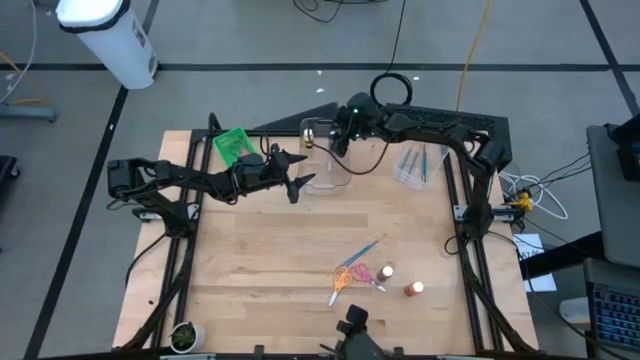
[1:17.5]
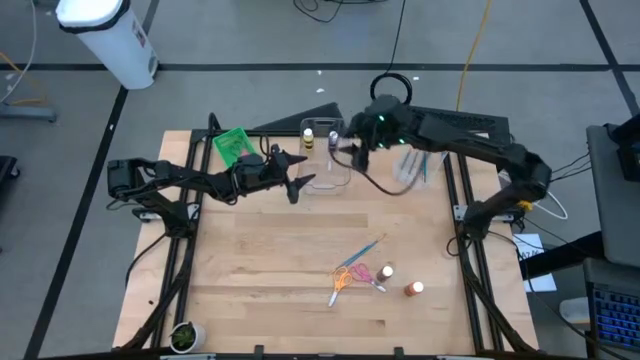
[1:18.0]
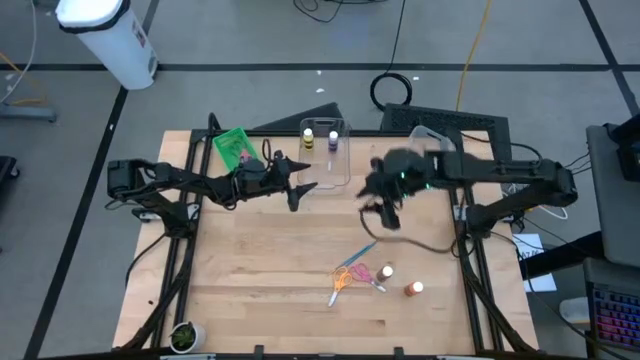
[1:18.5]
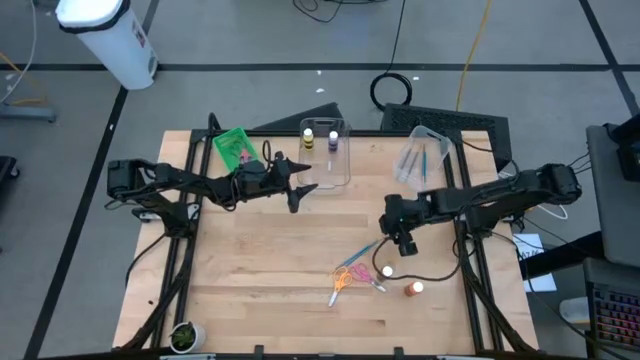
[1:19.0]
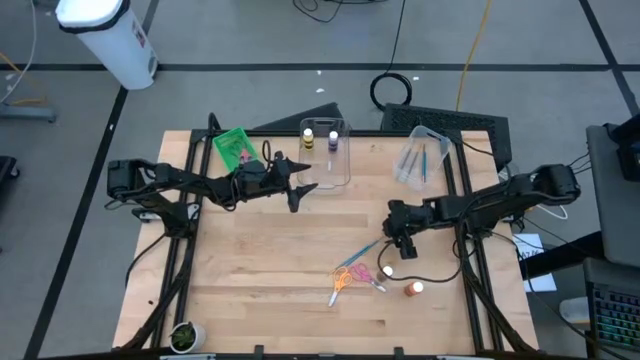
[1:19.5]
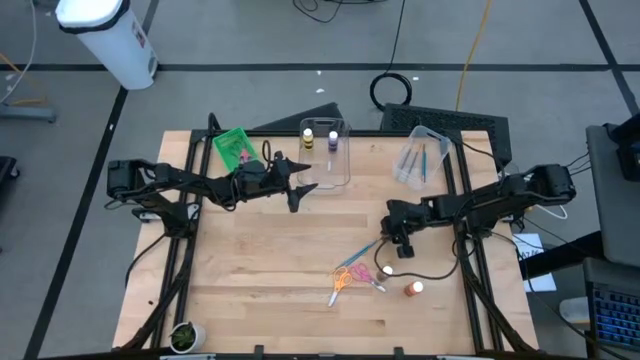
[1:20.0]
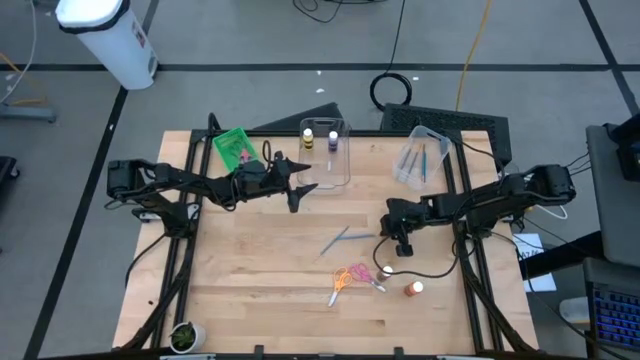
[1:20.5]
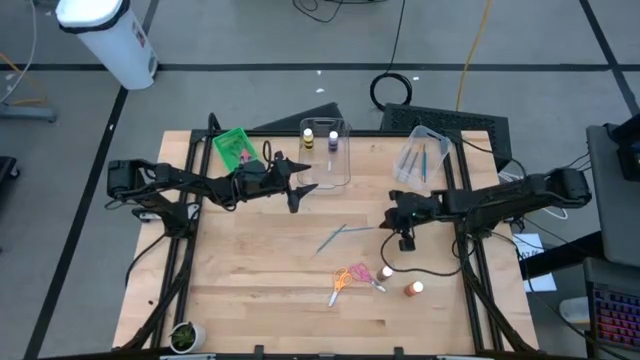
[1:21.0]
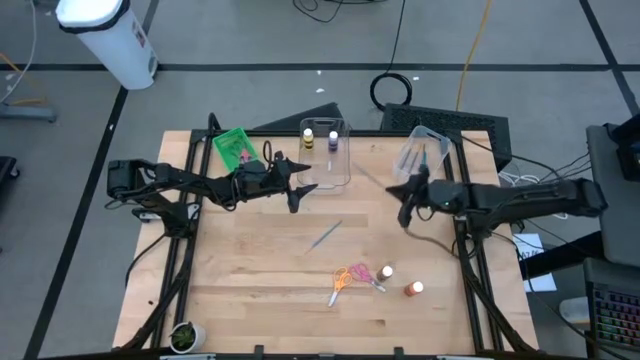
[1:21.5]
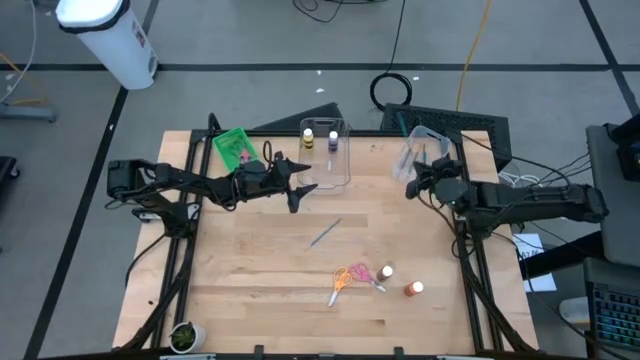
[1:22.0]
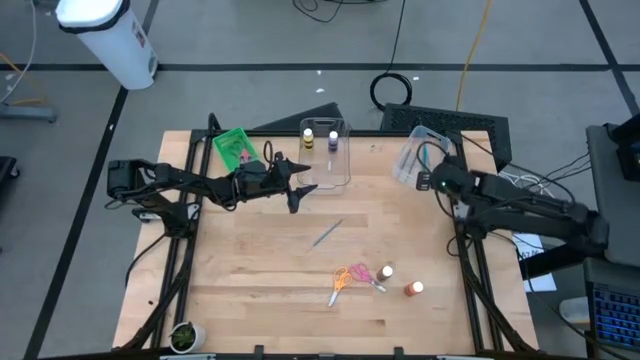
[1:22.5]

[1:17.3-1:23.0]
Task: Pick & Place Paint Supplies
Put the blue paint brush into the white bin

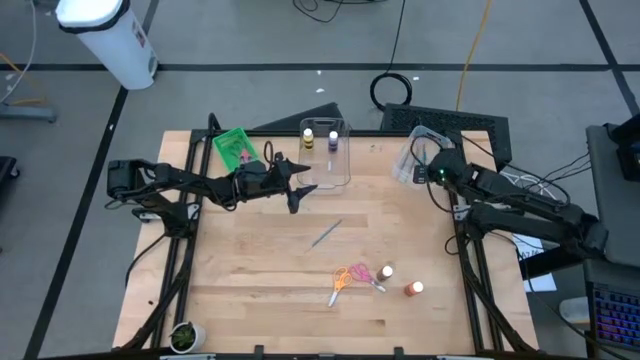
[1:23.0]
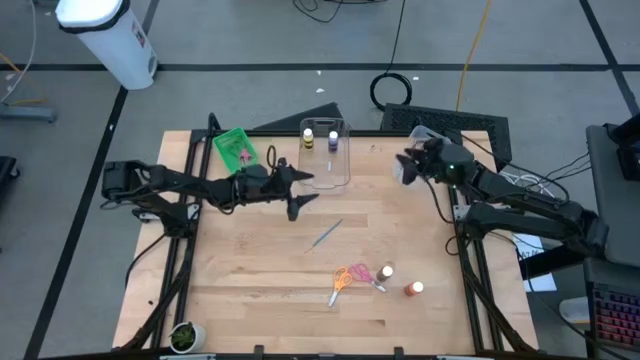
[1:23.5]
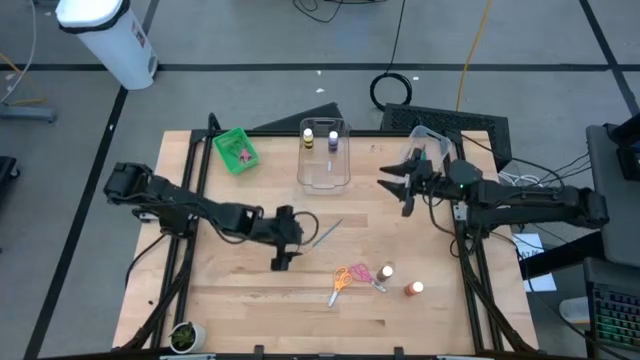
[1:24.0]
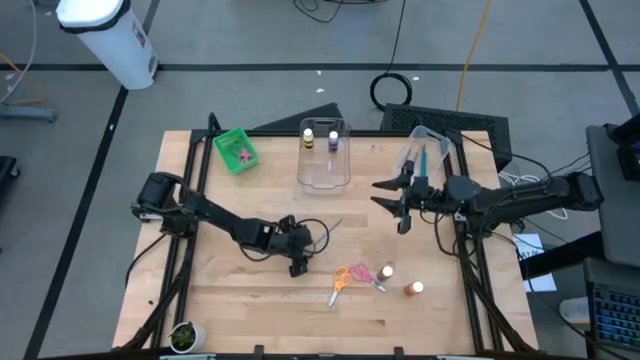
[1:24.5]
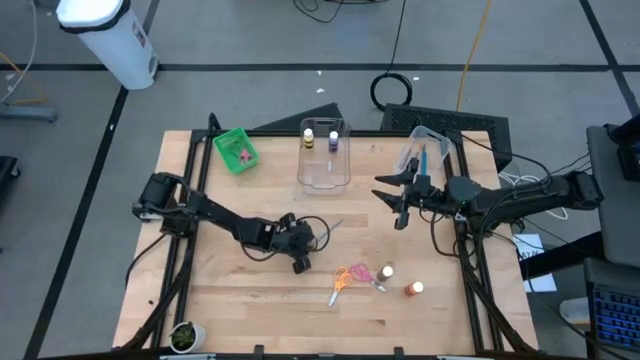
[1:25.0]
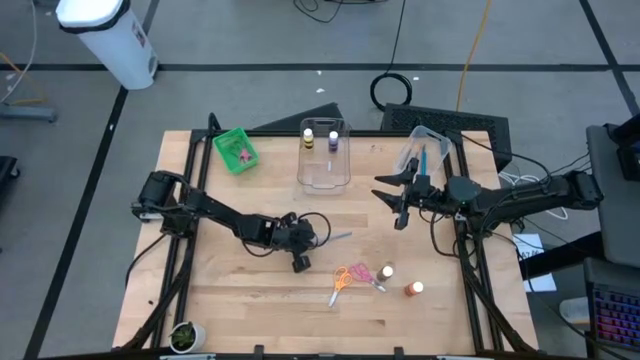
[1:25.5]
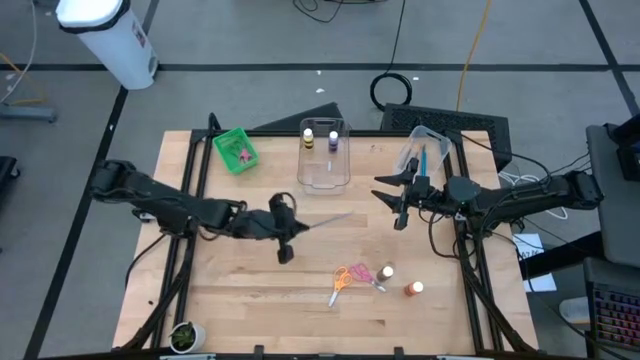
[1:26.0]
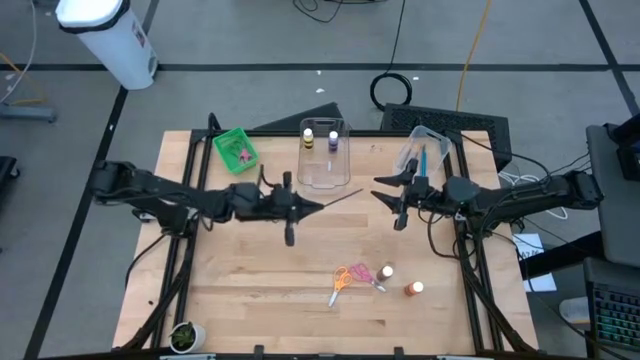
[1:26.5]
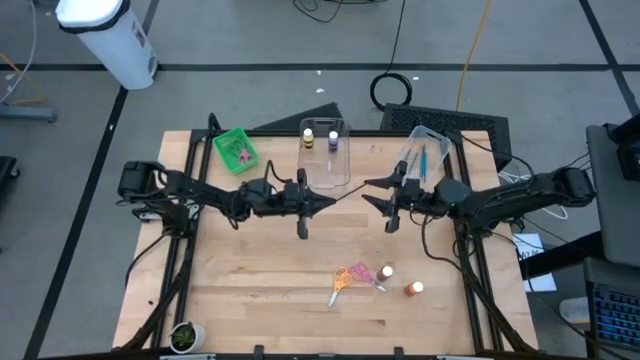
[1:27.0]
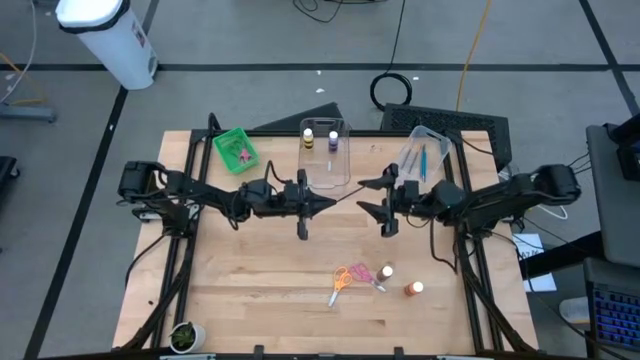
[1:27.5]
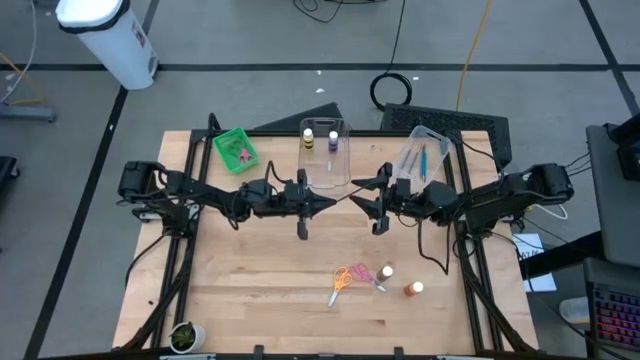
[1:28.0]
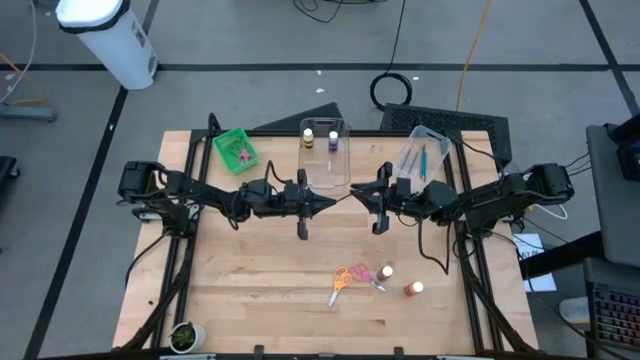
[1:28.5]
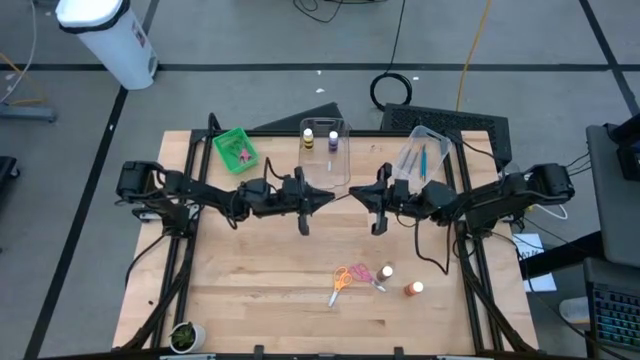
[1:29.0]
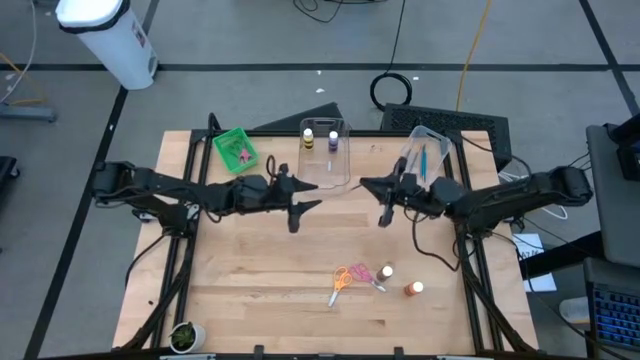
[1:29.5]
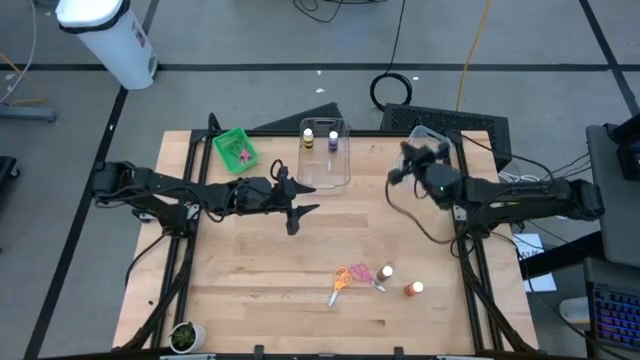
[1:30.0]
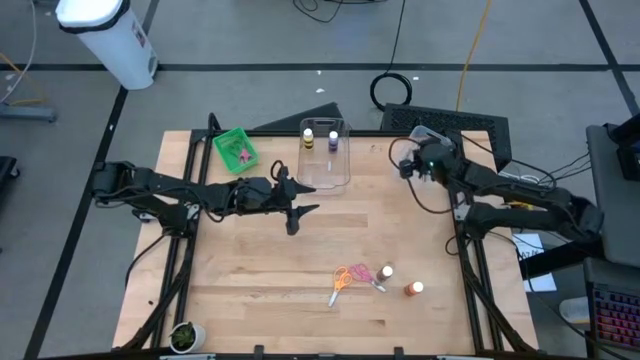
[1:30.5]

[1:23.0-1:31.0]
Put the blue paint brush into the white bin

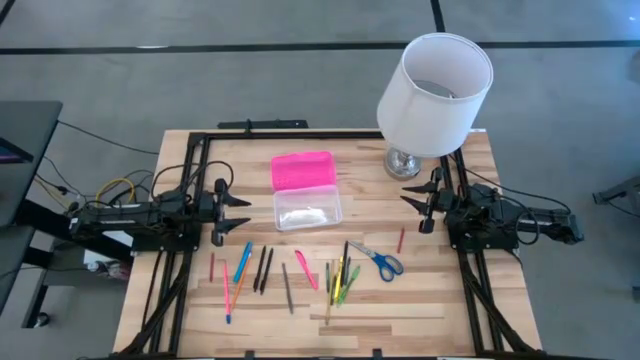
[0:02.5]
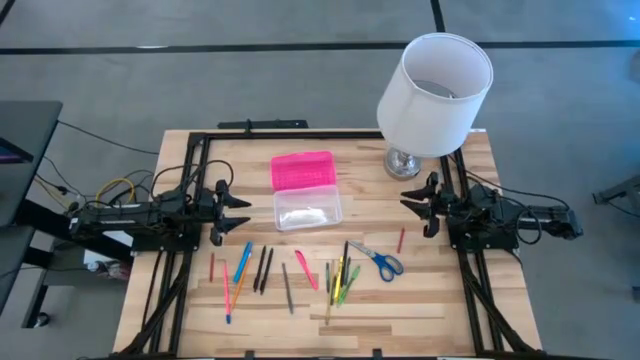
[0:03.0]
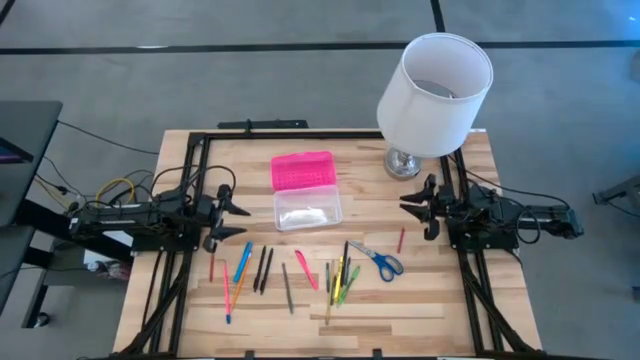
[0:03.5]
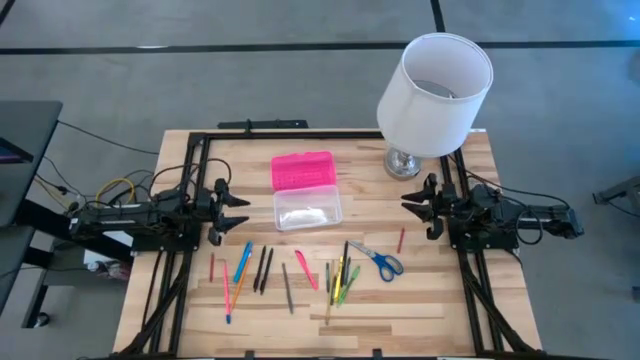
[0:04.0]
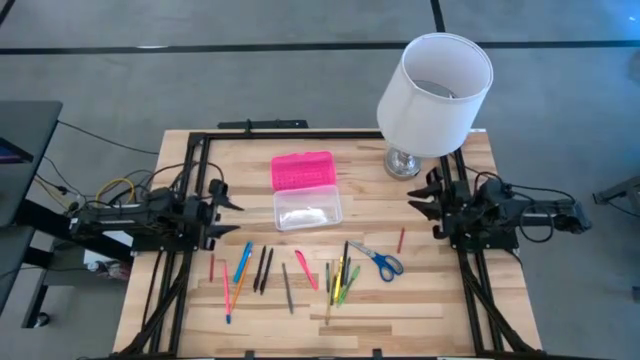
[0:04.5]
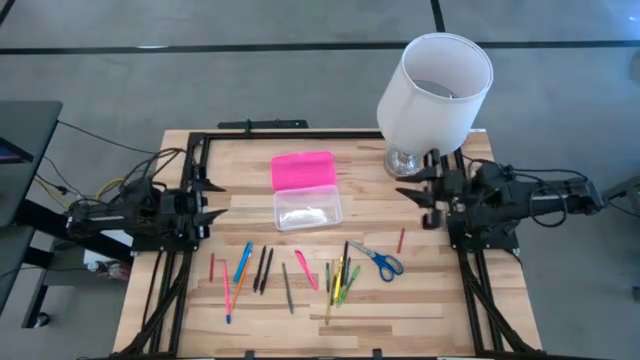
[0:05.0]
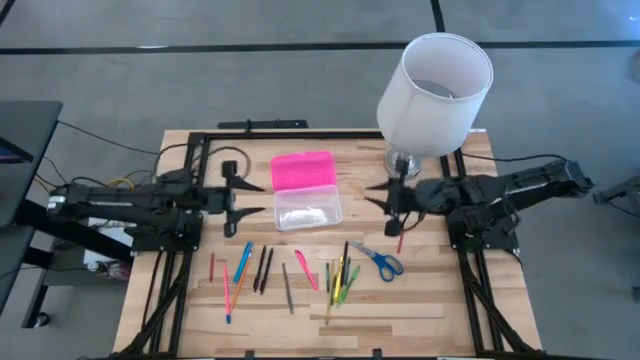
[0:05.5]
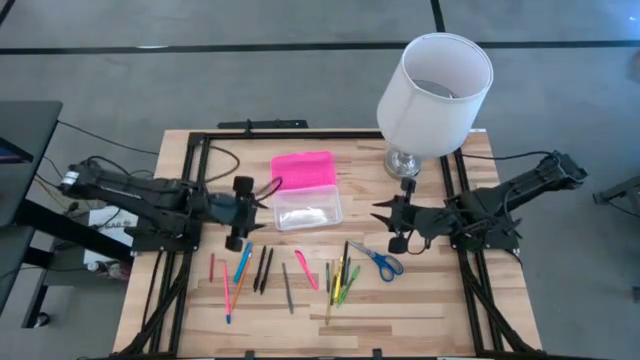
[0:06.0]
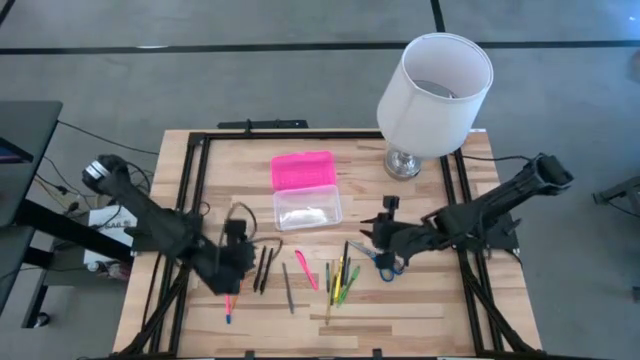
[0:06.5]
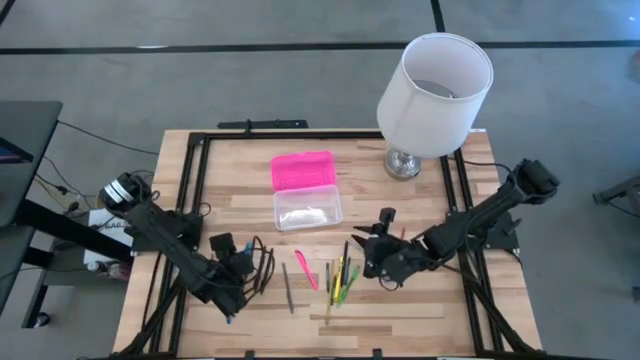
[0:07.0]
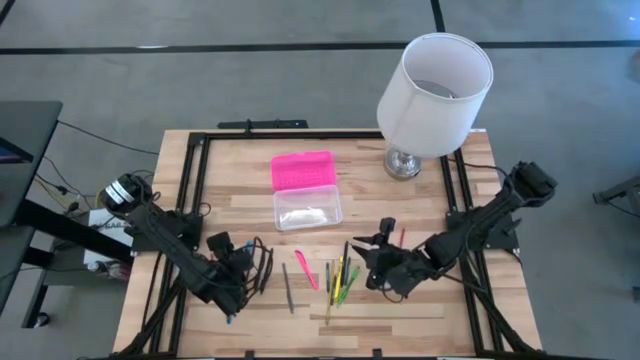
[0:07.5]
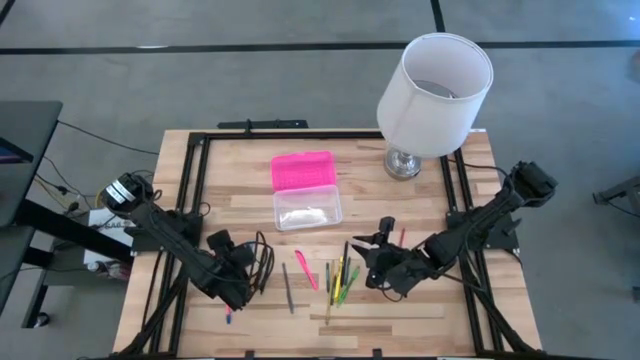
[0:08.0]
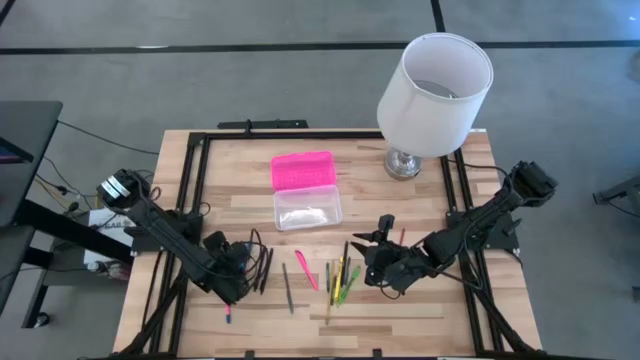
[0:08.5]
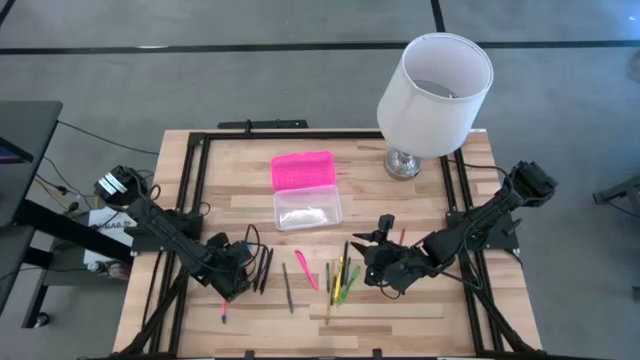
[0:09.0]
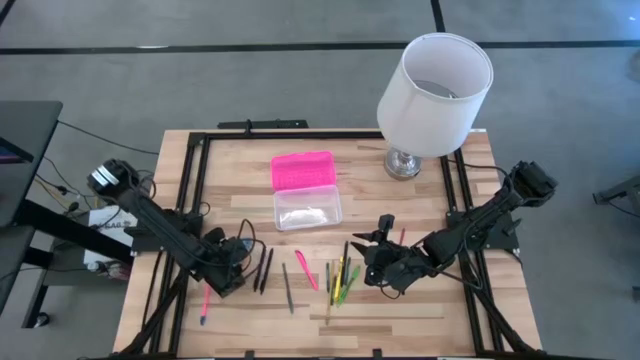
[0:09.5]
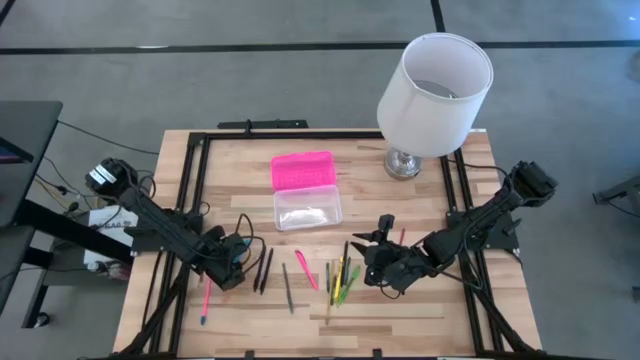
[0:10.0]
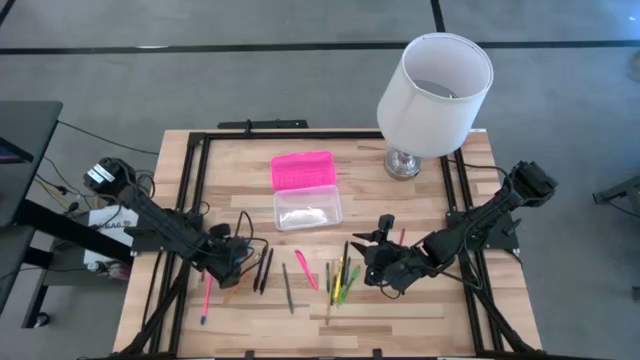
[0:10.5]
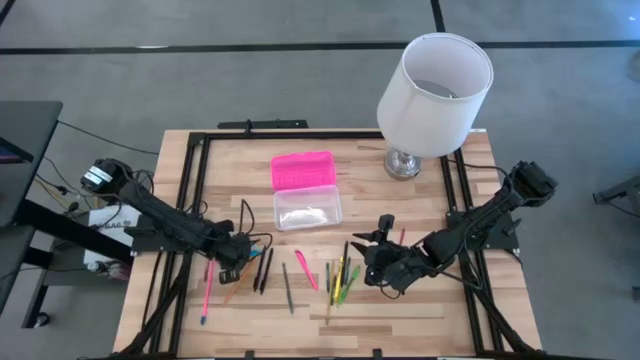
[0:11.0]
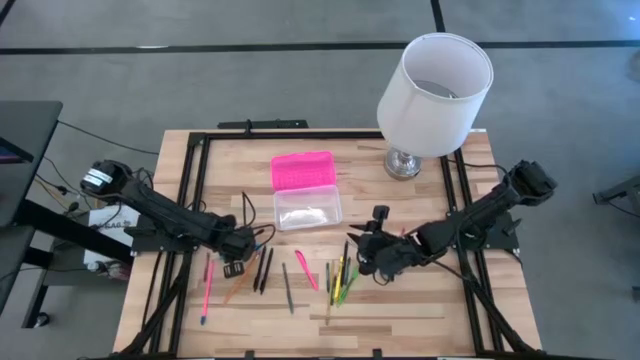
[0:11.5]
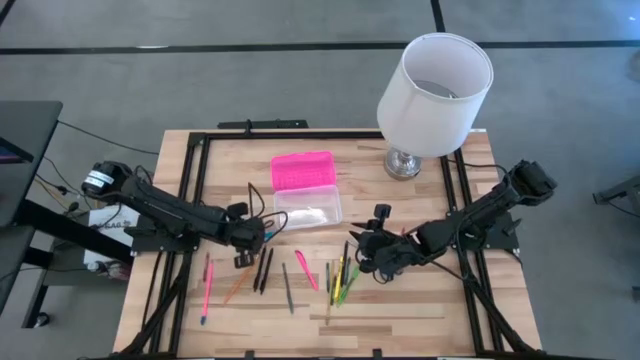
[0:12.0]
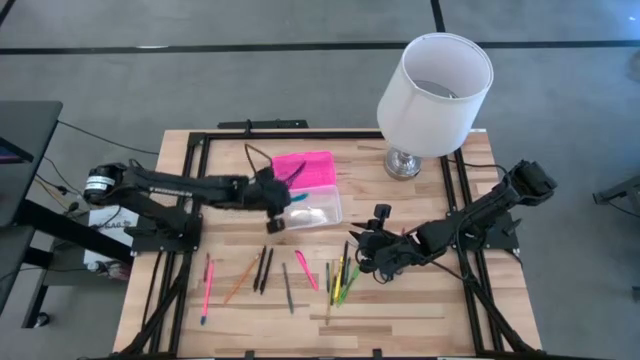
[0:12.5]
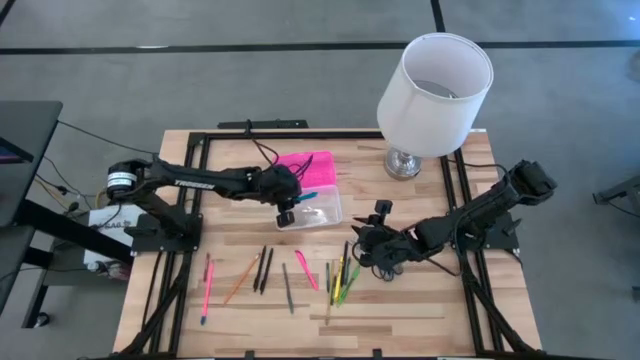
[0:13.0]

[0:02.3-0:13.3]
Task: Pick & place school supplies into a supply box
Put the blue pen into the pink supply box
